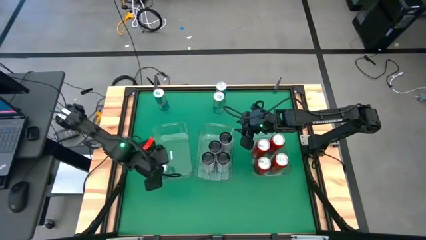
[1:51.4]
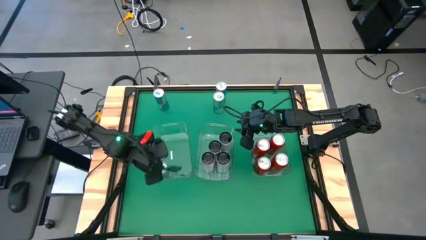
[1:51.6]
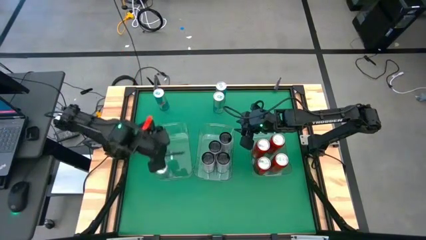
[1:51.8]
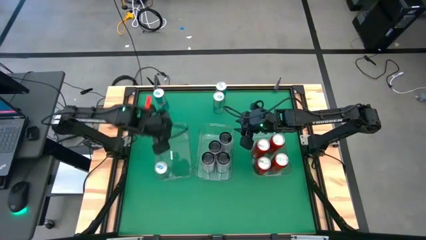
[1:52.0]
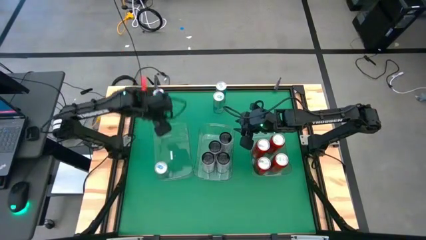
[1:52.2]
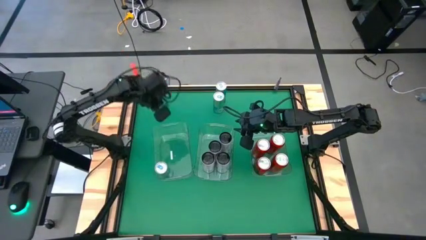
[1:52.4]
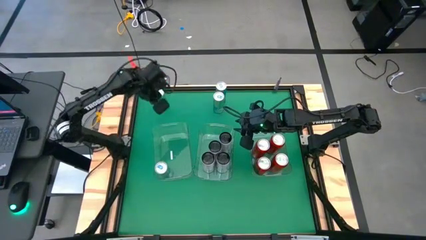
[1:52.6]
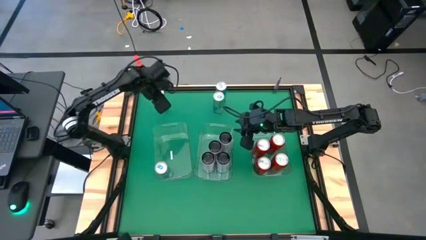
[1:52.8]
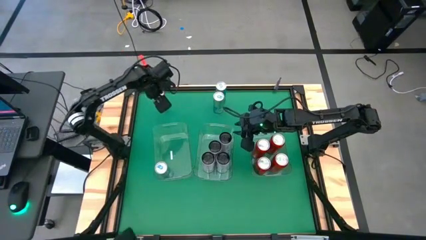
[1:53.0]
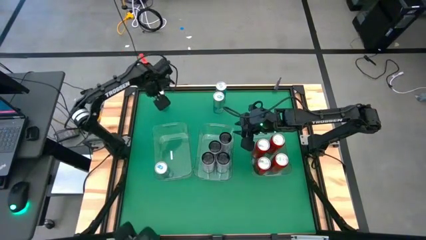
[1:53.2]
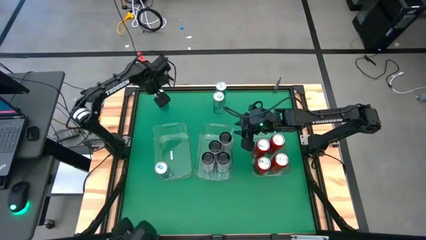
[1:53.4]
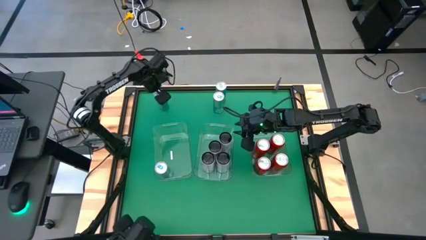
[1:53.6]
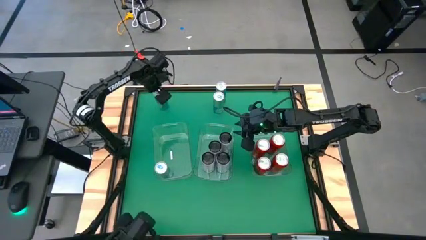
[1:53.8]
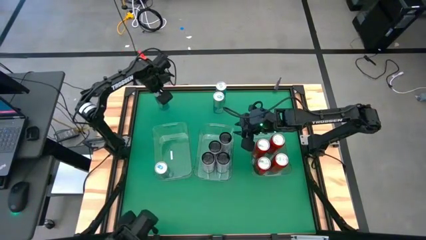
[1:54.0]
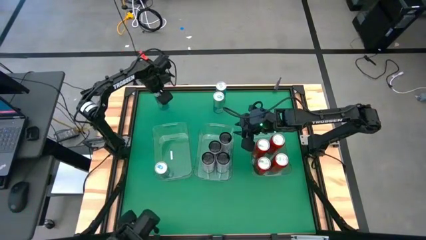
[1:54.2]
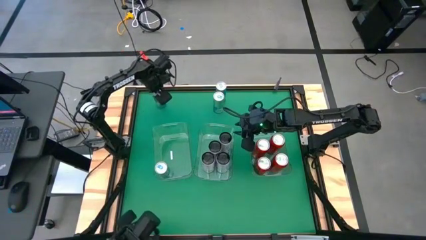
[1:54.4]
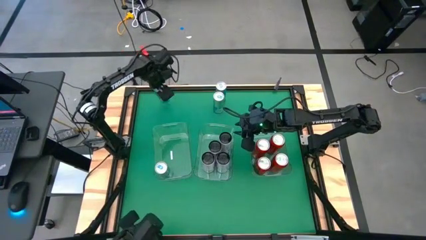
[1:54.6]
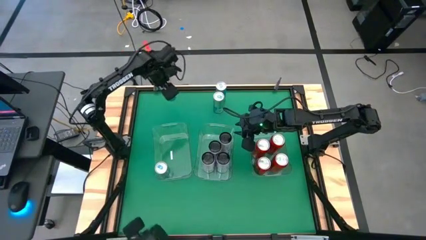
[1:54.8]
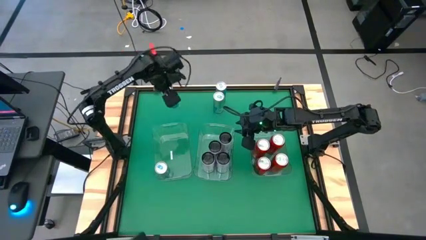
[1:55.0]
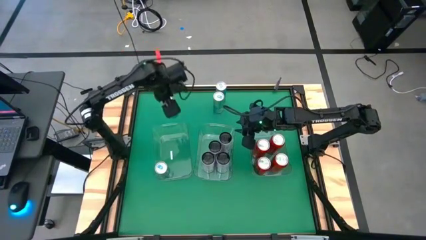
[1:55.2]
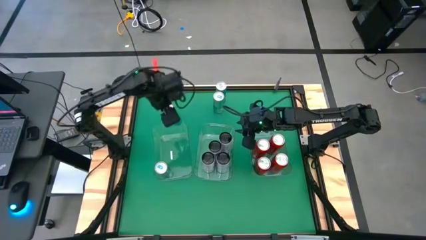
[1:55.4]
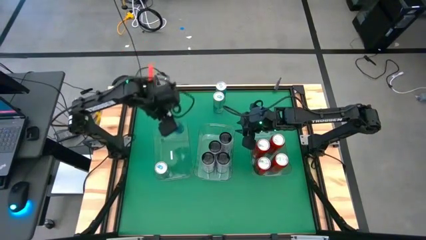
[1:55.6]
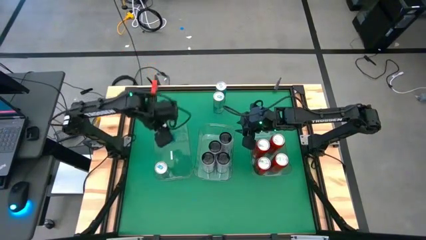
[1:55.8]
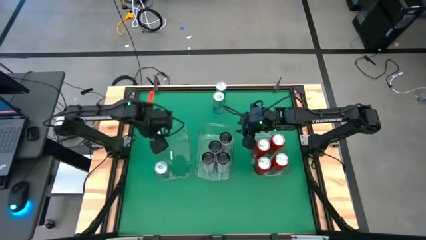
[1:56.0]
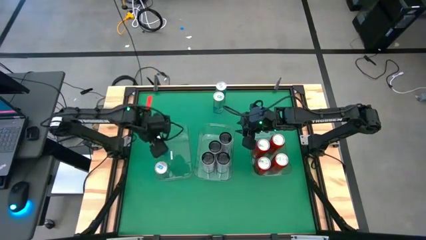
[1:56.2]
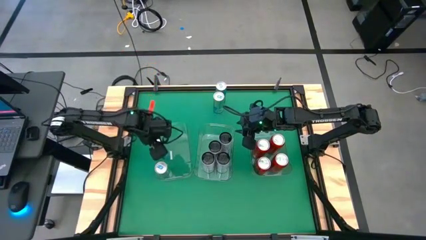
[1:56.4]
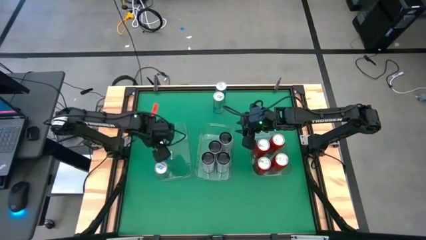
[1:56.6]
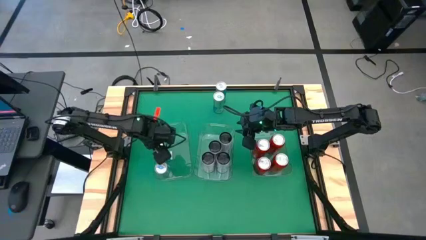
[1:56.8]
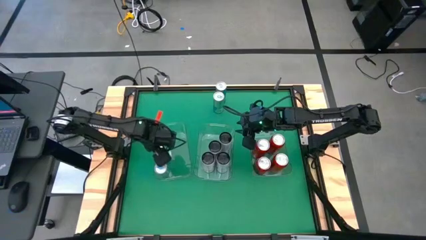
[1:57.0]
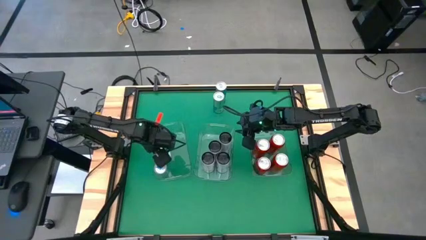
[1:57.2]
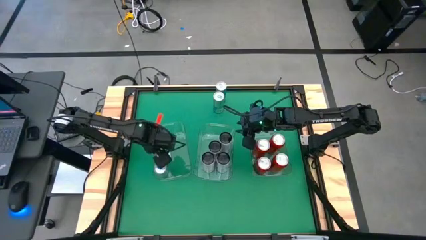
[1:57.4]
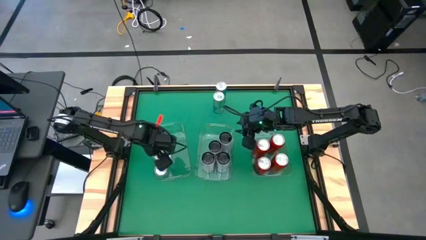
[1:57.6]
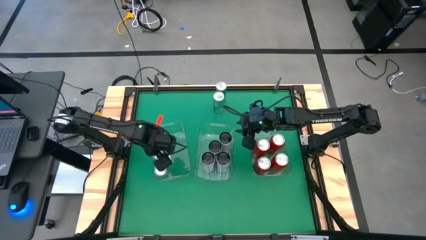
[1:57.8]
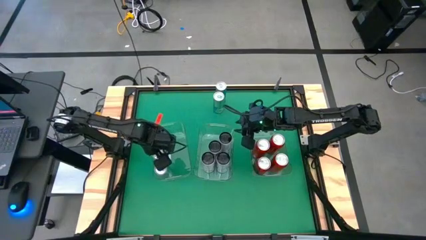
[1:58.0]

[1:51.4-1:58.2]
Task: Sort soda cans
Put the top left blue soda can into the left transparent bin

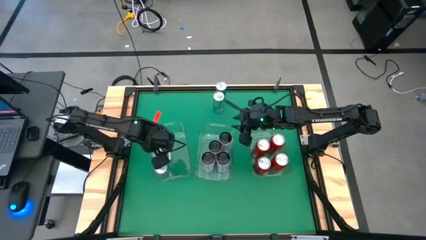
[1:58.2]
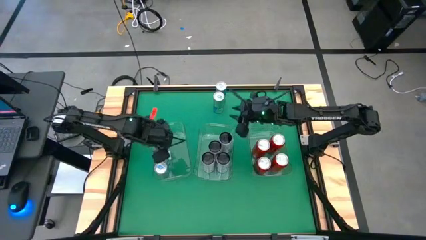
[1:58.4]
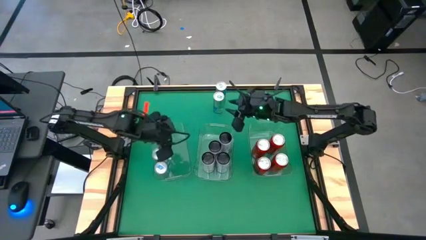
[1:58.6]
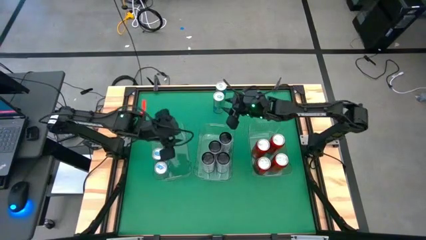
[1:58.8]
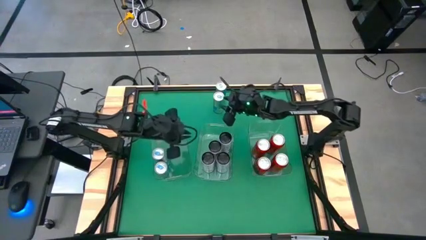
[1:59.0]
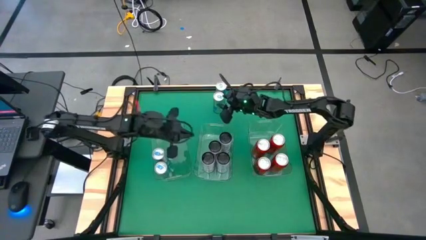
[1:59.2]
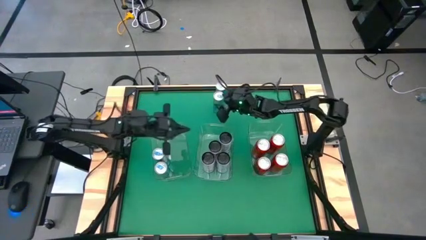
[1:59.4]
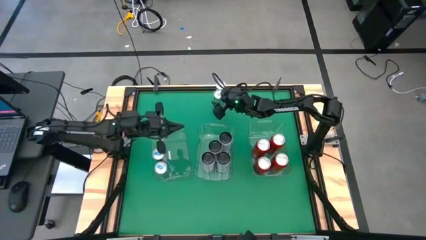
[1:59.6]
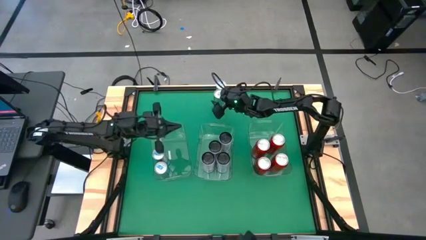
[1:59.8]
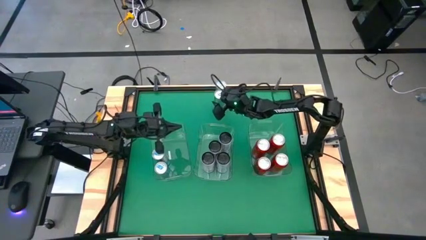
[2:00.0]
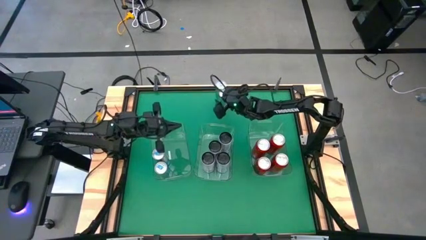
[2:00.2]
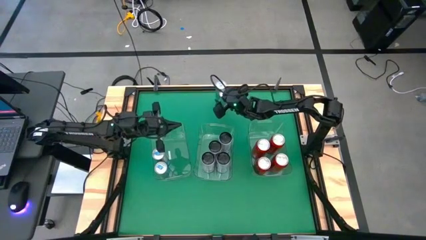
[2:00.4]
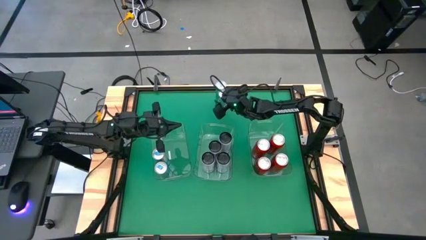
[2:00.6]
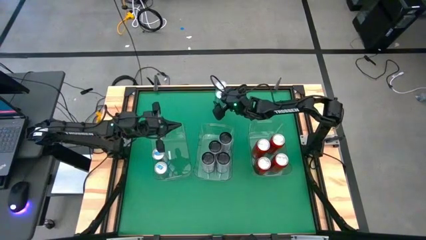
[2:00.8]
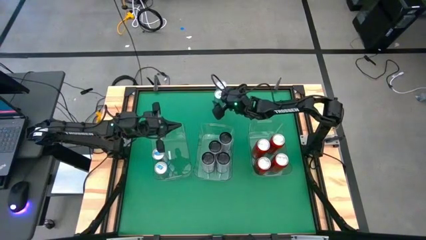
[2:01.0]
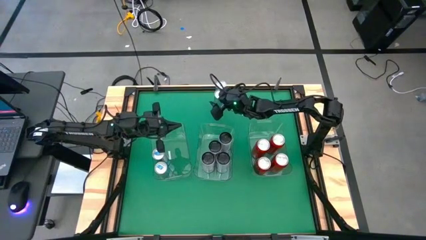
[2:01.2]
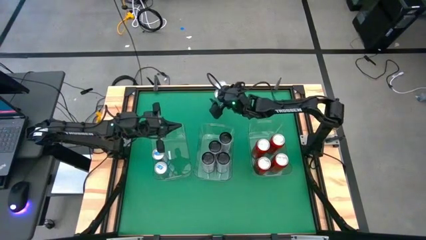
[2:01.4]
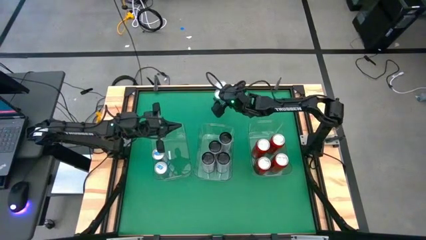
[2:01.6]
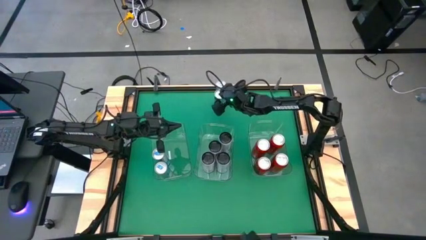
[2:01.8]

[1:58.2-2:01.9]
Put the bottom blue soda can into the left transparent bin

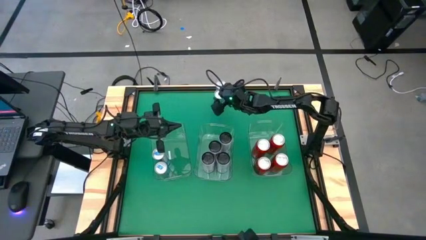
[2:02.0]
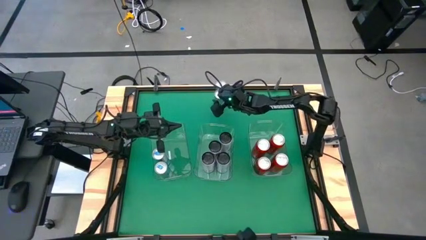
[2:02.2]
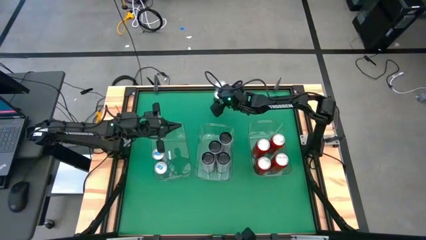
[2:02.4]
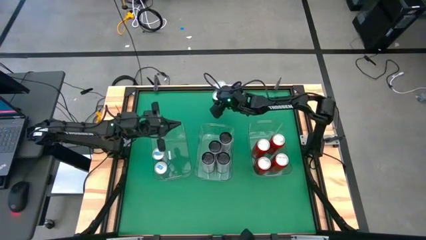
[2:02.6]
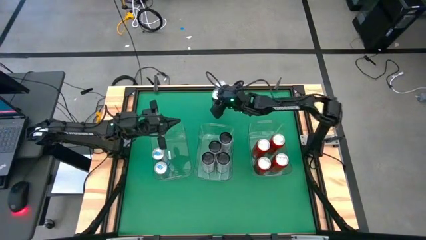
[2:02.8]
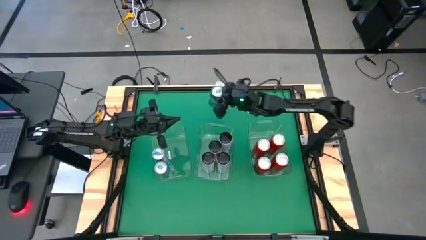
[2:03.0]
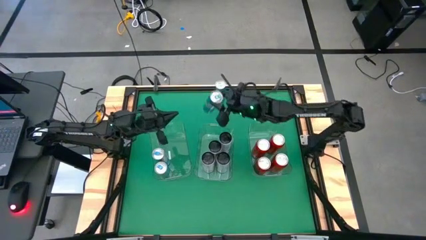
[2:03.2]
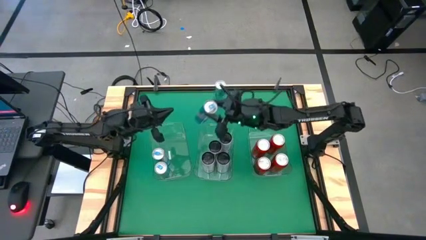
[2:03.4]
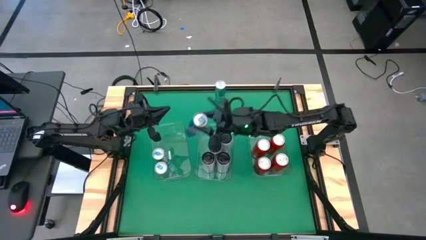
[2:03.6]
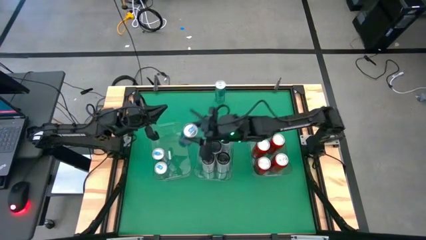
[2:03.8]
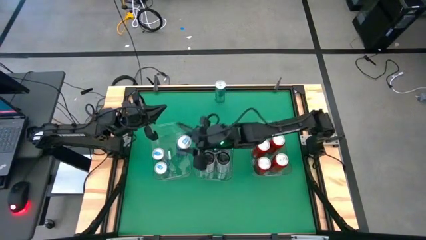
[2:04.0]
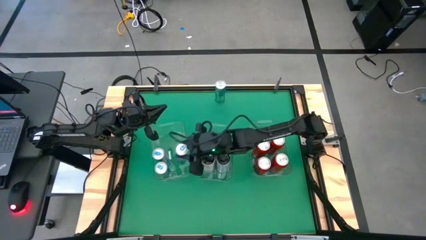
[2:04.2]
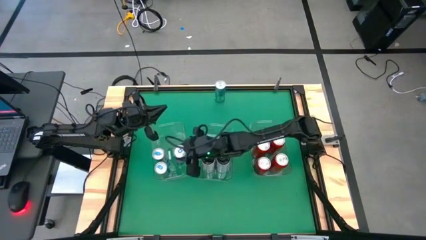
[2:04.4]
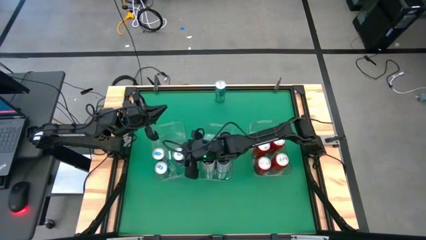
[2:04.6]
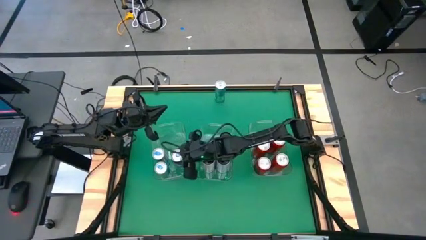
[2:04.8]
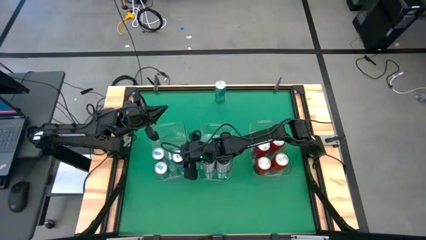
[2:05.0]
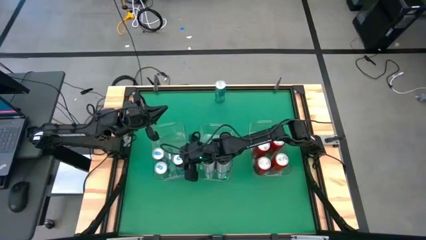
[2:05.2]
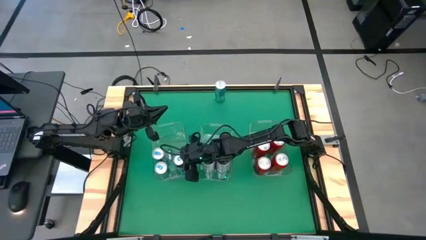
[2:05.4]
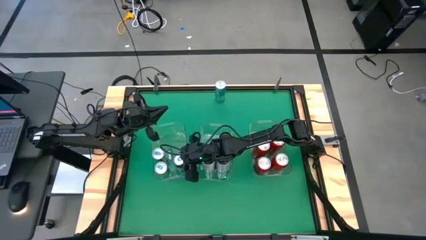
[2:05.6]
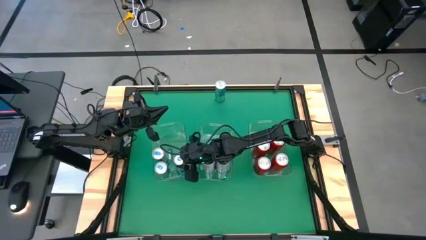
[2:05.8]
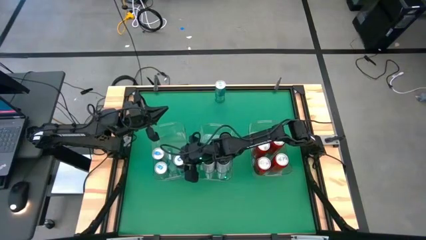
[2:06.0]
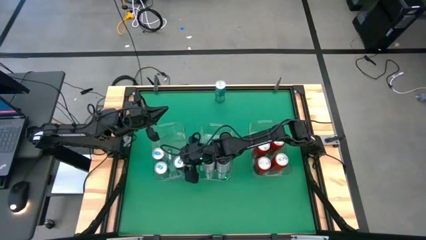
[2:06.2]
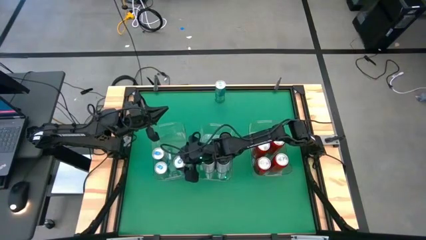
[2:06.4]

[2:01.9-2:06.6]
Put the bottom blue soda can into the left transparent bin
